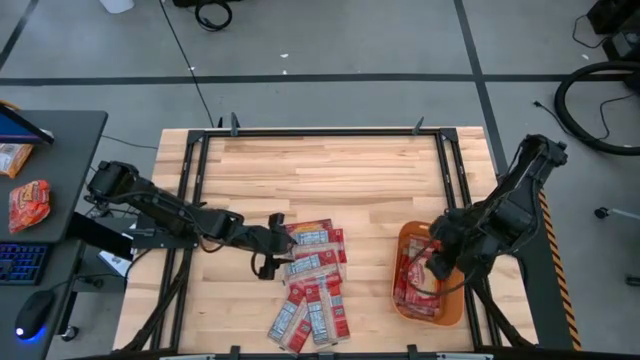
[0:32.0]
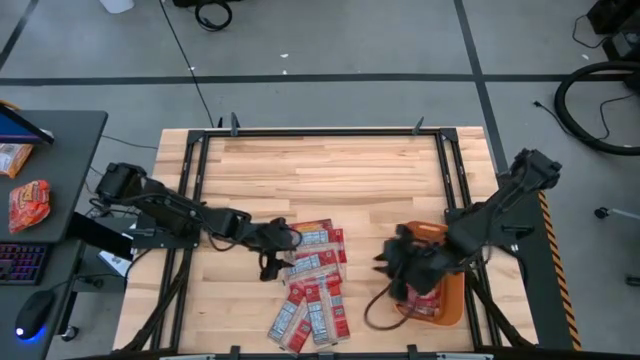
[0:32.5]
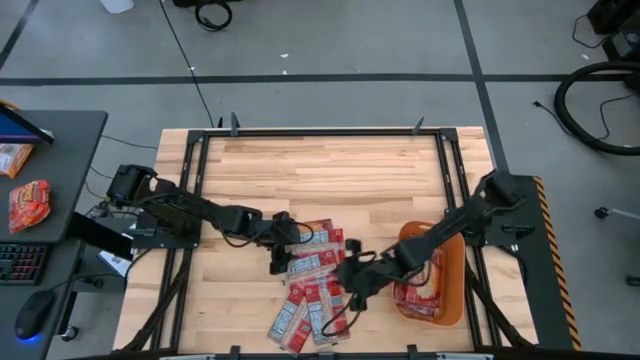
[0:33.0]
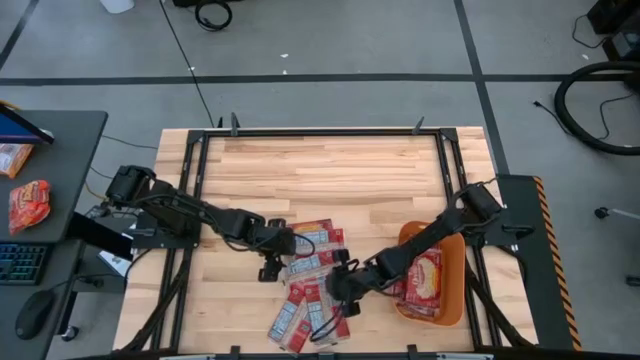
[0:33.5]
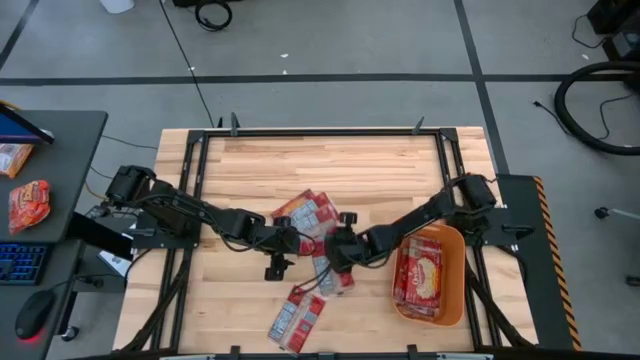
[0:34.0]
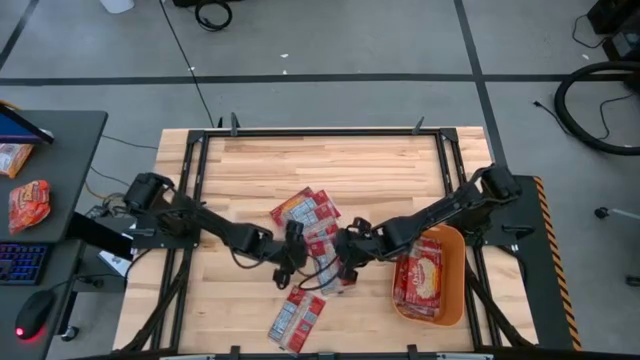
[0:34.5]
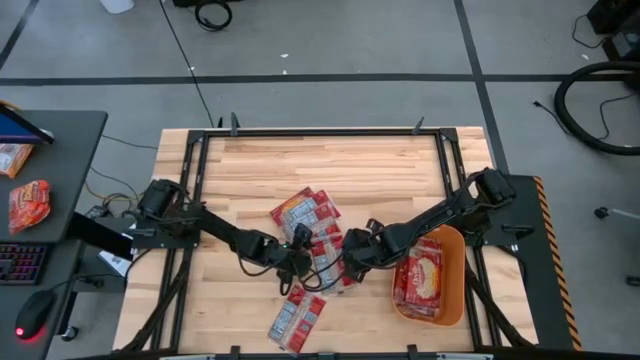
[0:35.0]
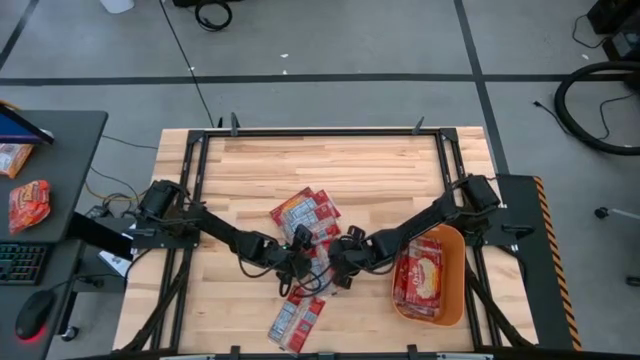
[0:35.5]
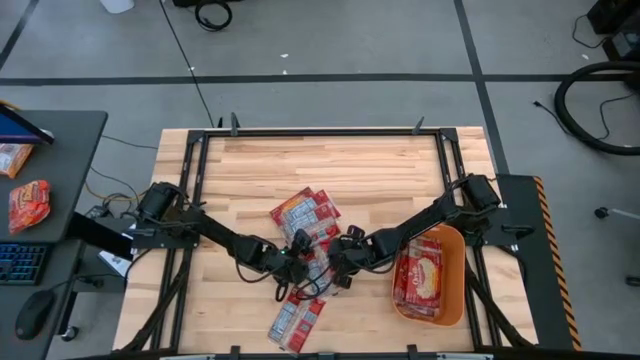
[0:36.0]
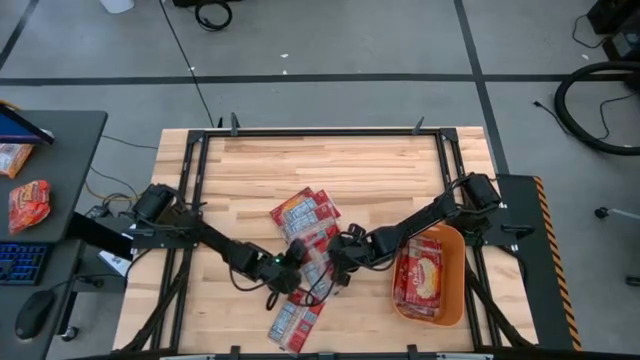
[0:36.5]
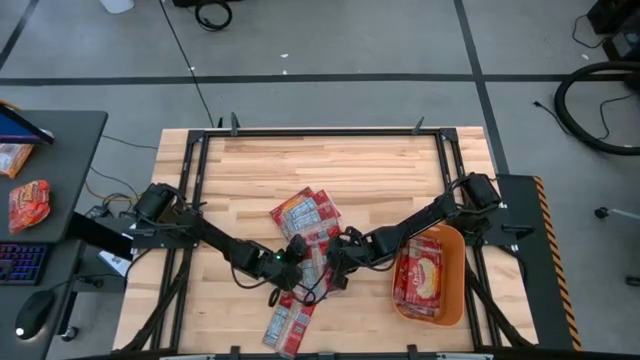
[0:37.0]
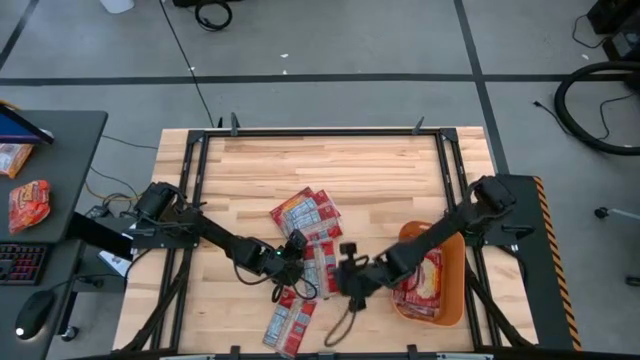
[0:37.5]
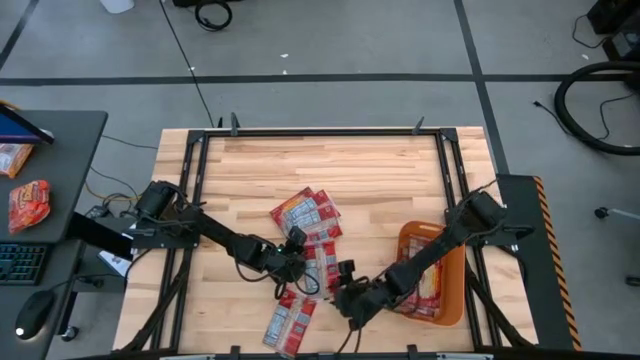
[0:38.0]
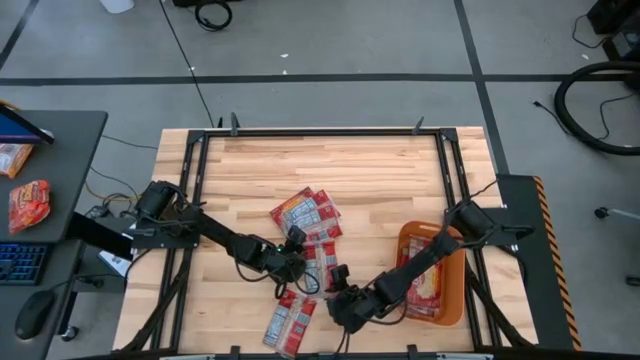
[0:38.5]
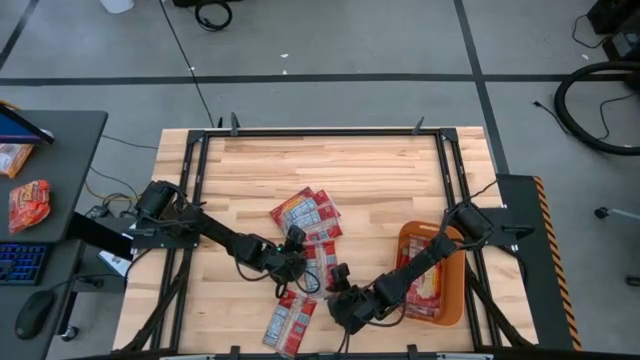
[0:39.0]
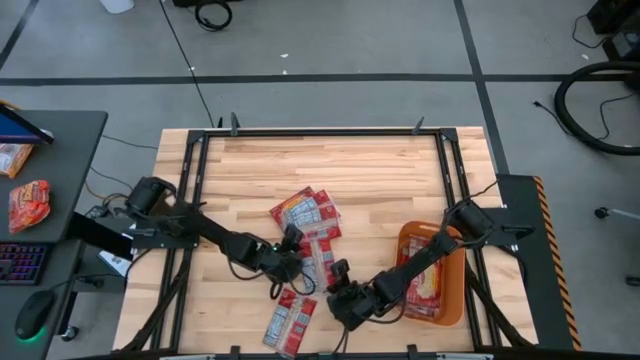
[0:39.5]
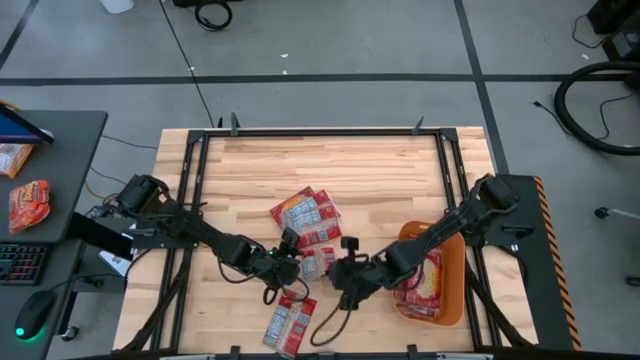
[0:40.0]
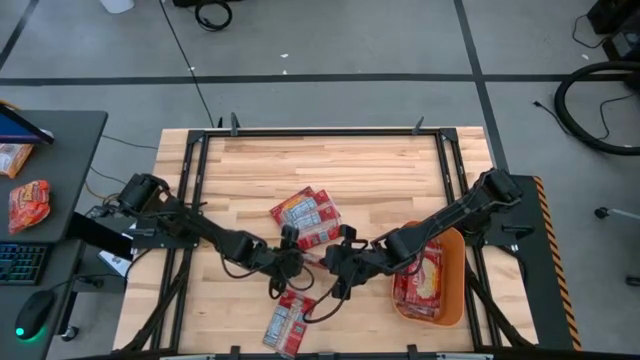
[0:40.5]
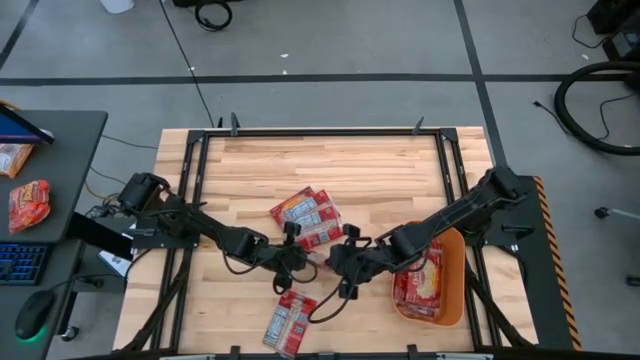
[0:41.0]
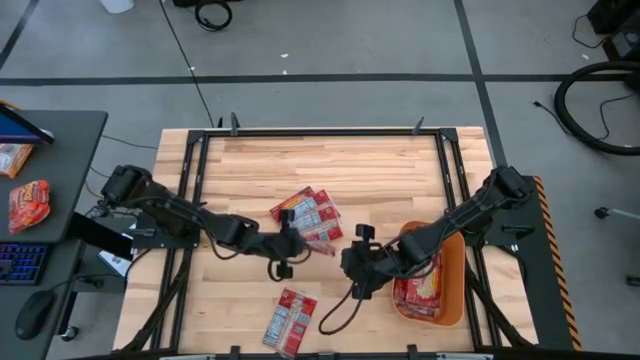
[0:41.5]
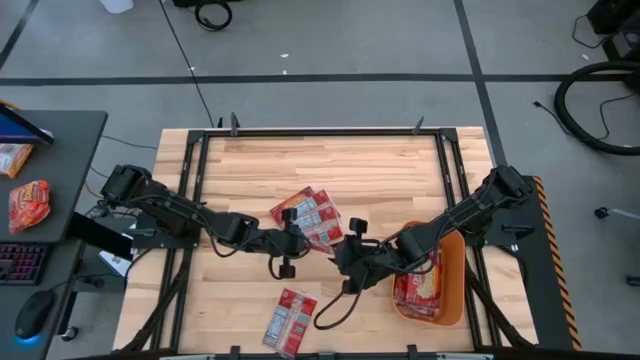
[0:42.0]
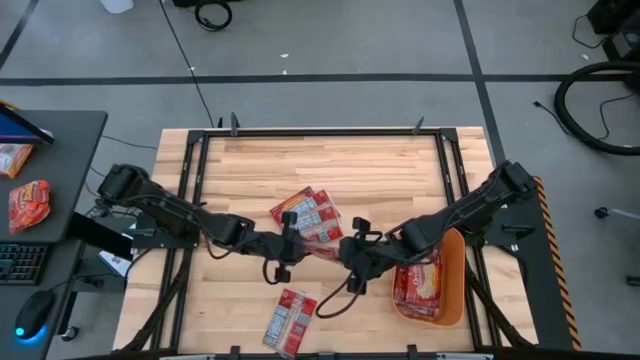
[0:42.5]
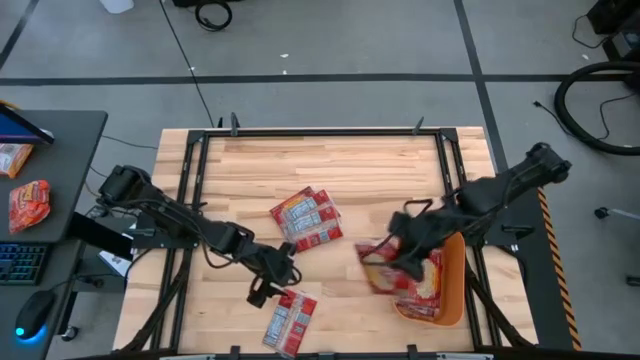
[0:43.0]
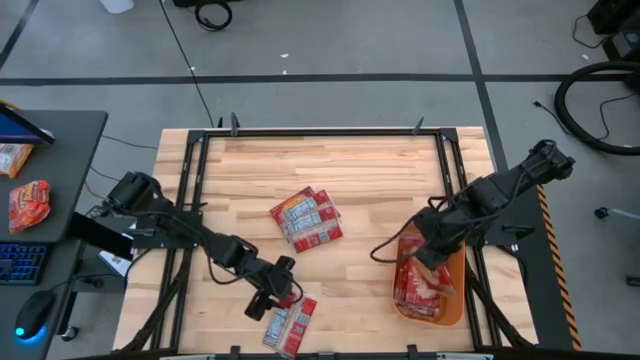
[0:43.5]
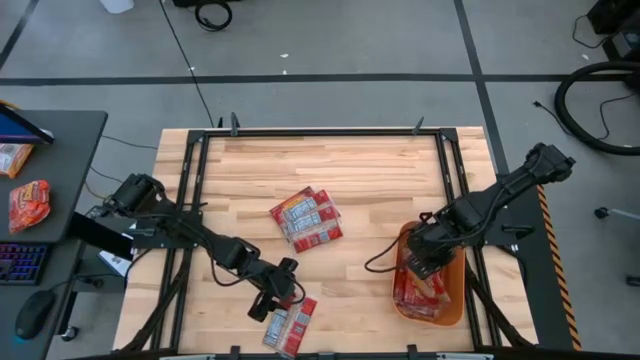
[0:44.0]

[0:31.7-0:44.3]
Task: Sort popcorn bags into baskets
Put the red popcorn bag into the orange bin

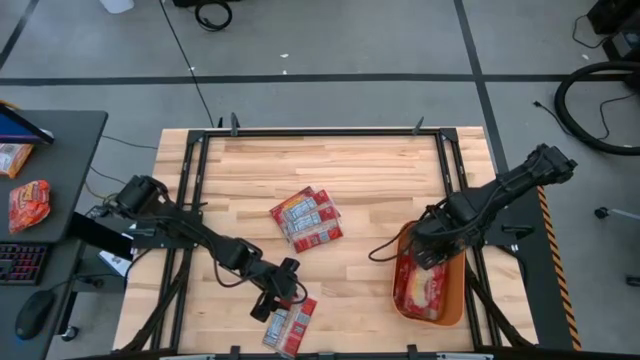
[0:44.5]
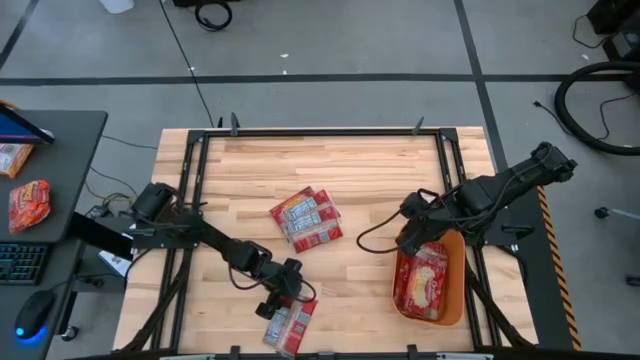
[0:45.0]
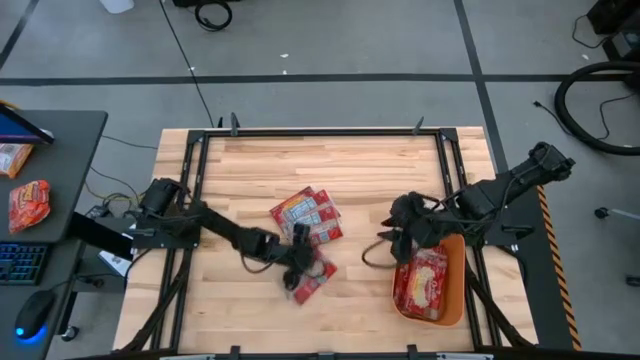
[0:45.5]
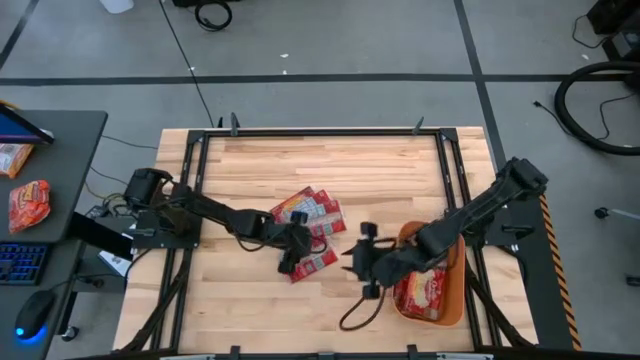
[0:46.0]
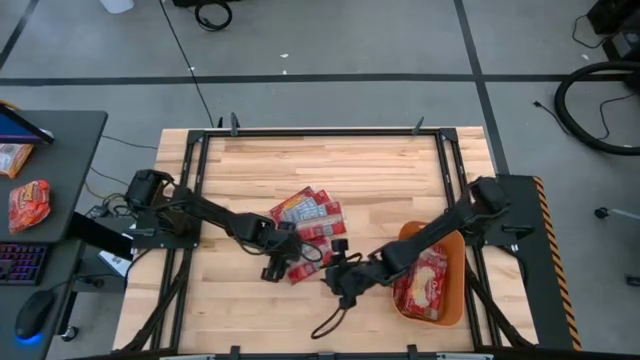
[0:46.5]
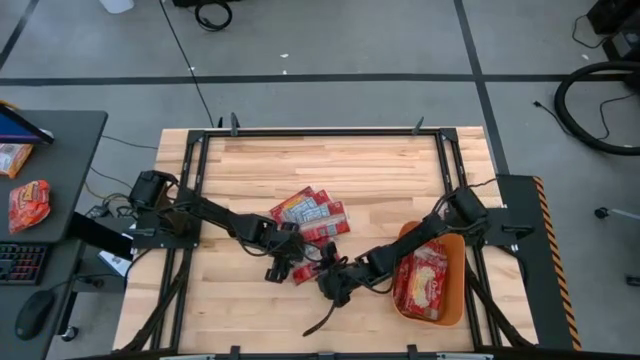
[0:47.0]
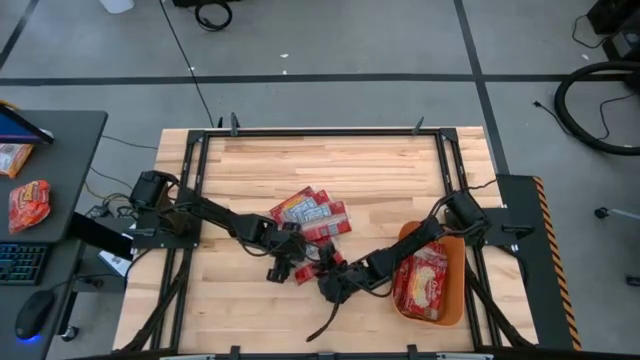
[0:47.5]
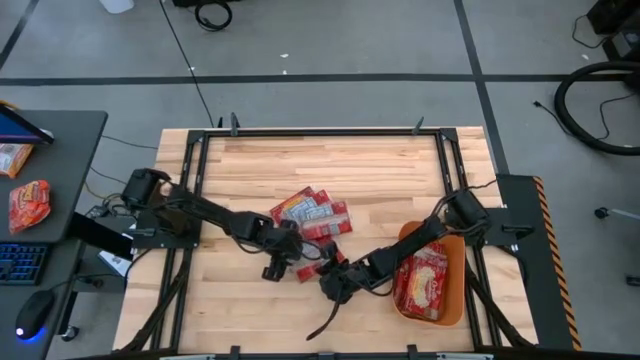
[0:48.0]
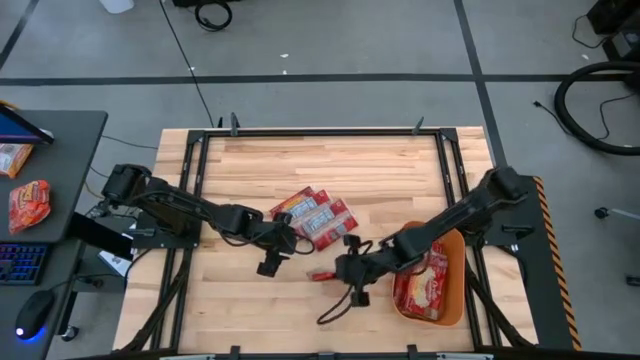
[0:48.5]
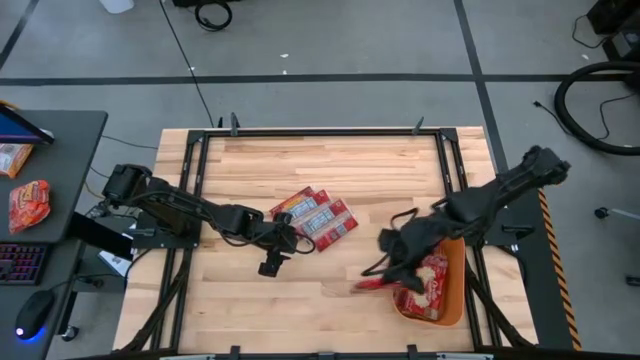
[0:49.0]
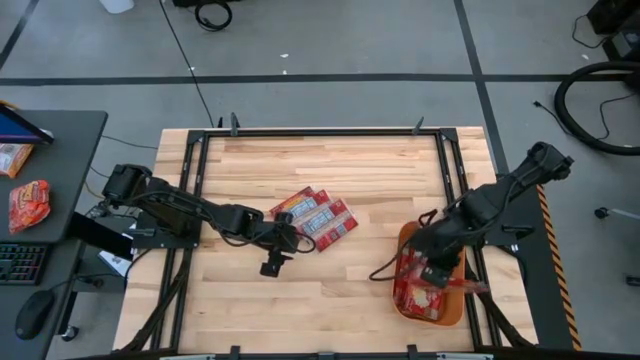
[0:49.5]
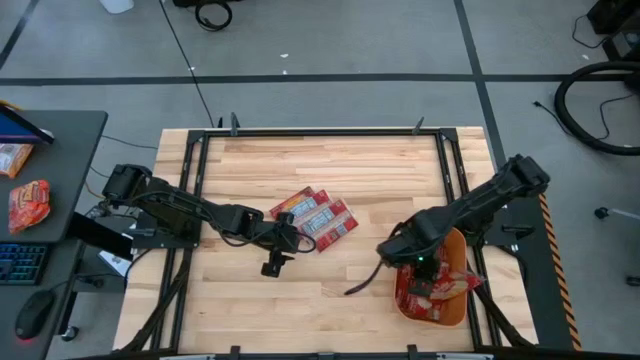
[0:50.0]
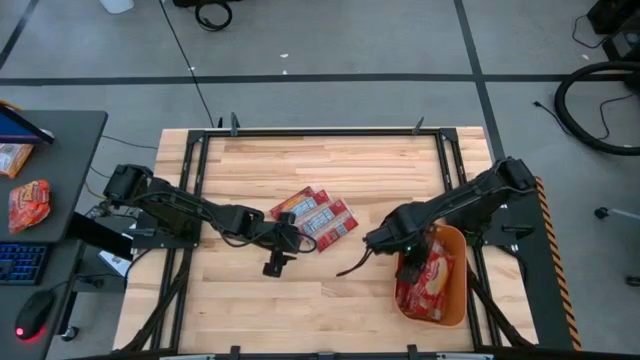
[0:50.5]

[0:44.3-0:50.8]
Put the red popcorn bag into the orange bin

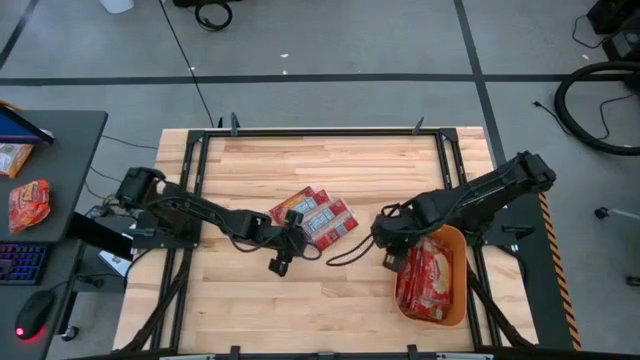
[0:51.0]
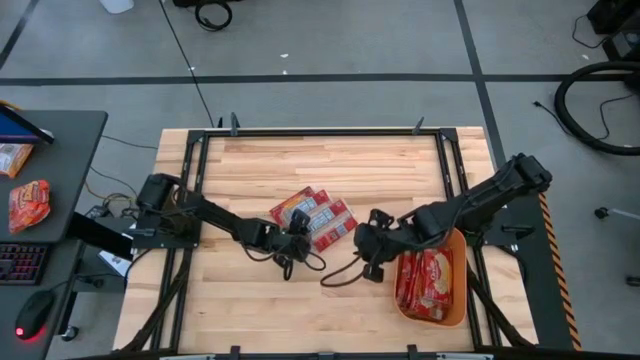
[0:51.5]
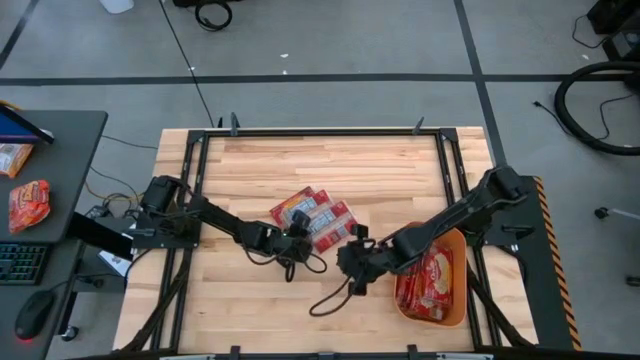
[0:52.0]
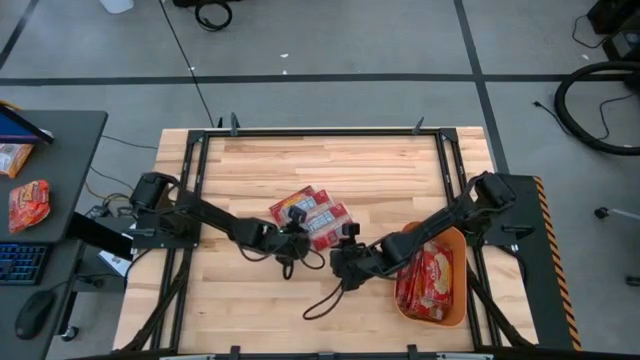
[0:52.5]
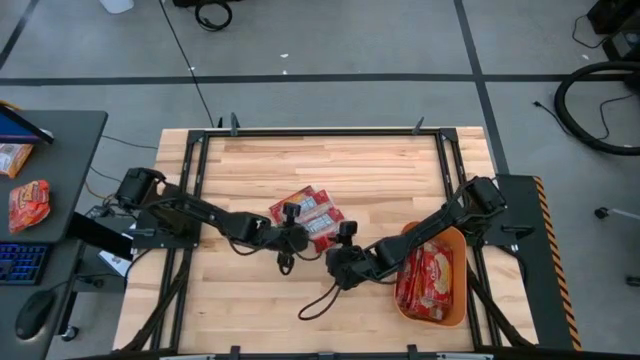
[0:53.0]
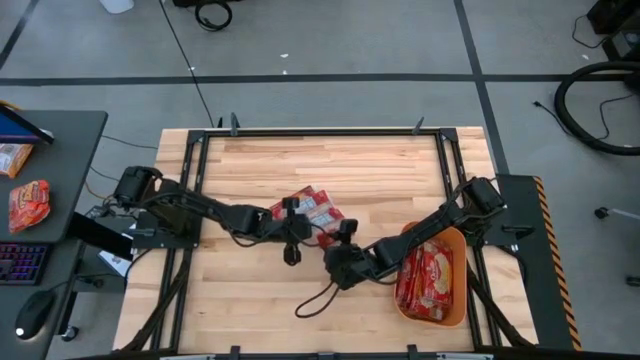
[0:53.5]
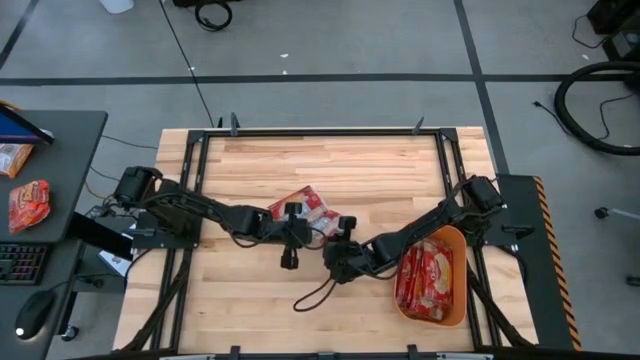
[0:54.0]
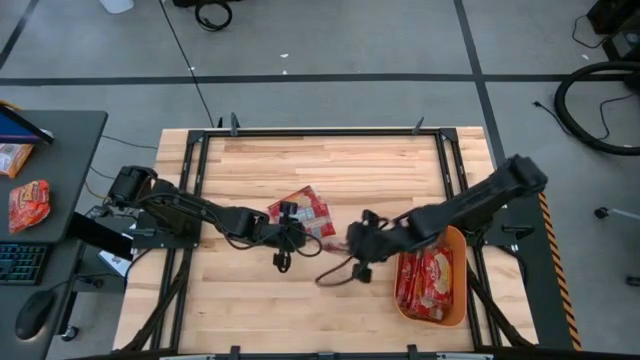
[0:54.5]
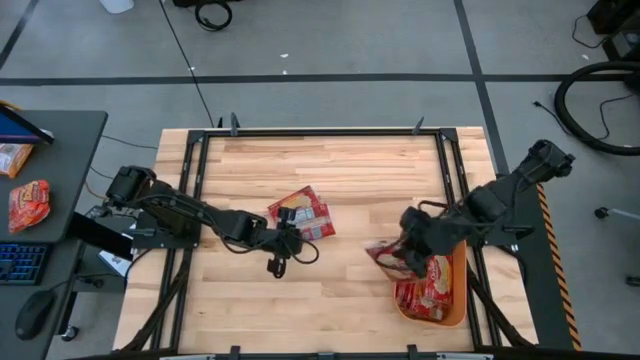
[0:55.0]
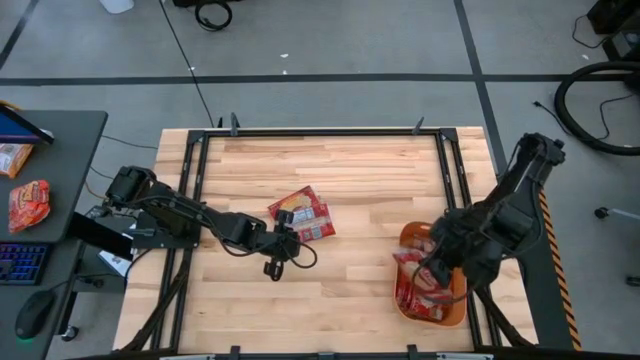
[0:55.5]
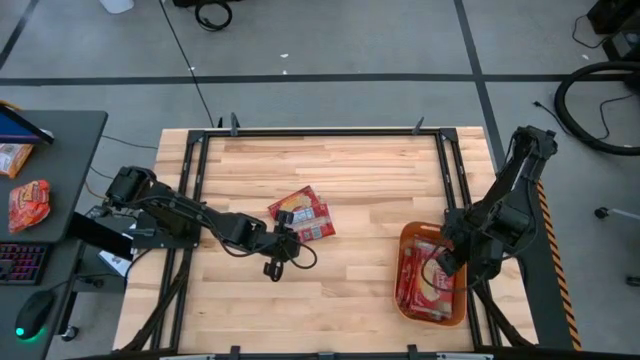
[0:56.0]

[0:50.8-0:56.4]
Put the red popcorn bag into the orange bin
